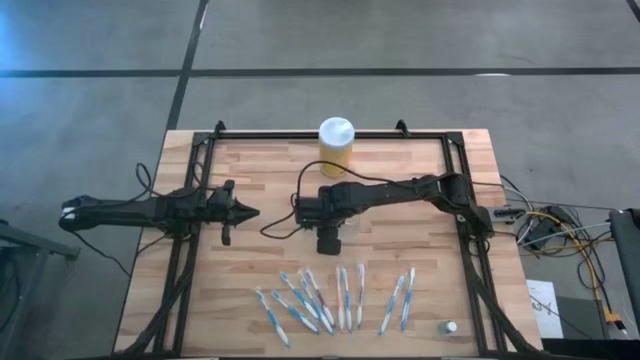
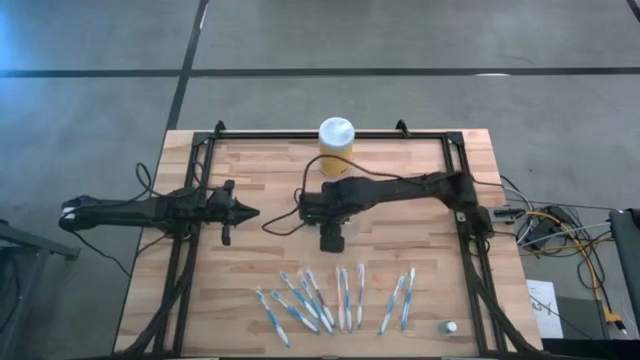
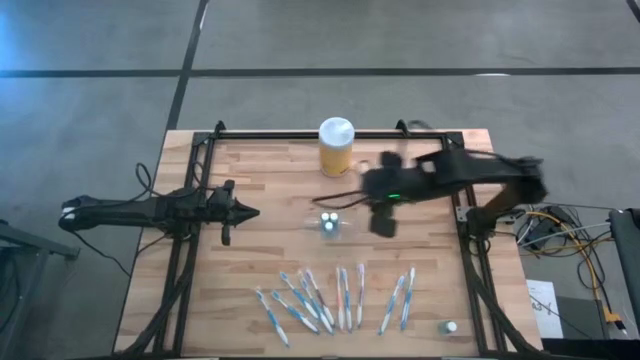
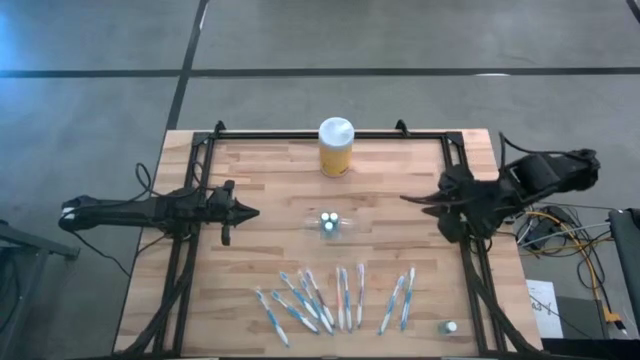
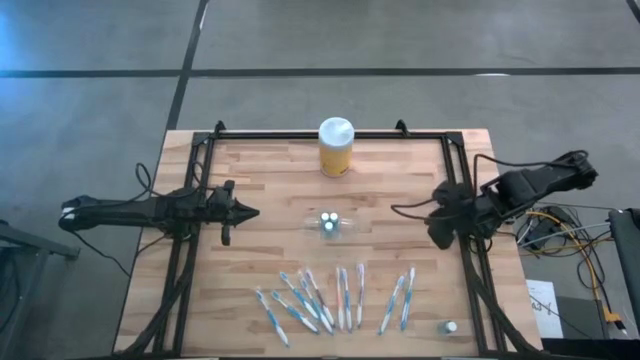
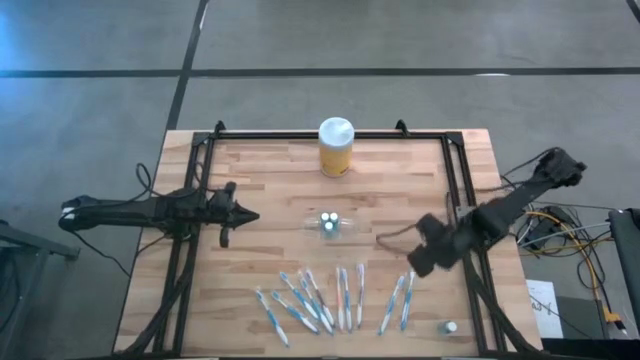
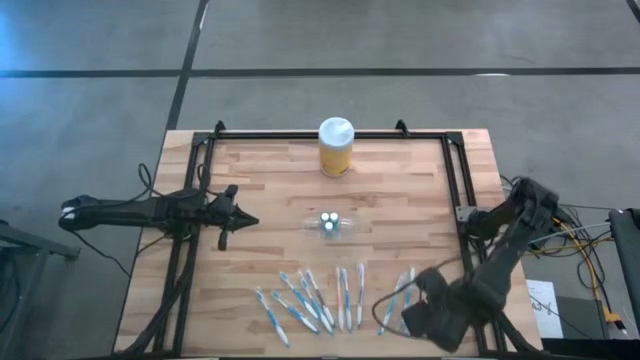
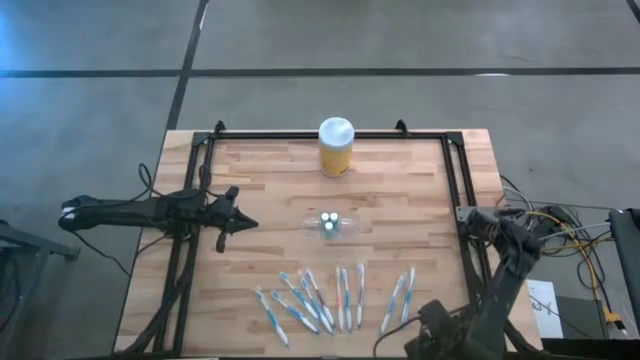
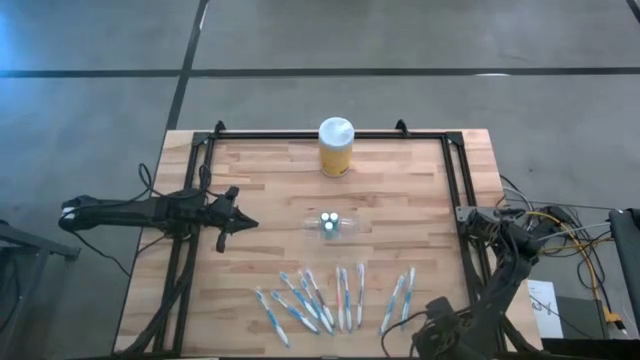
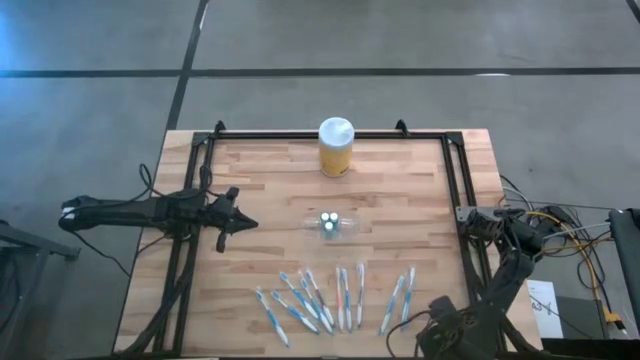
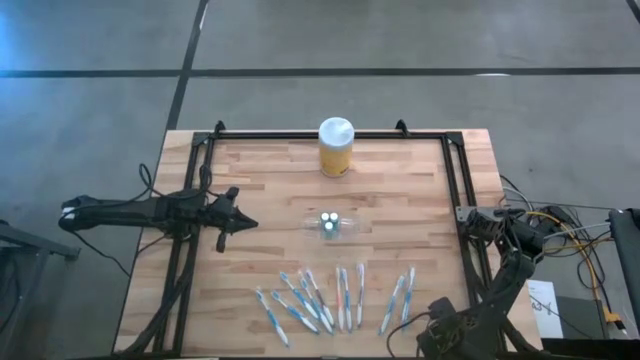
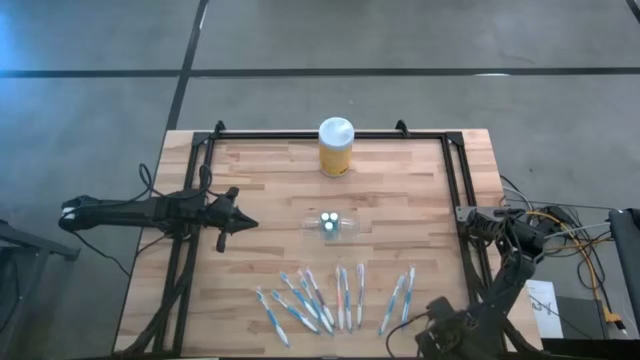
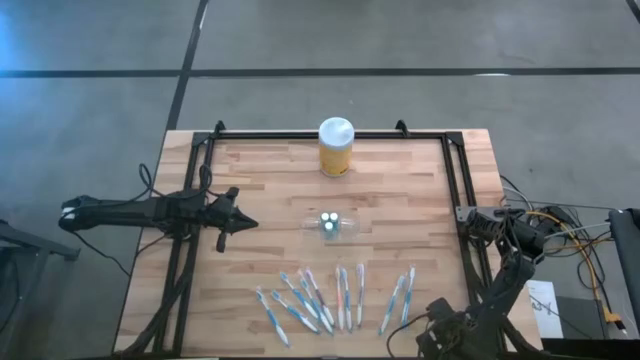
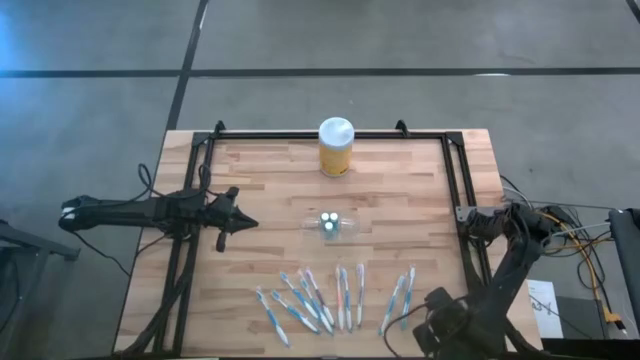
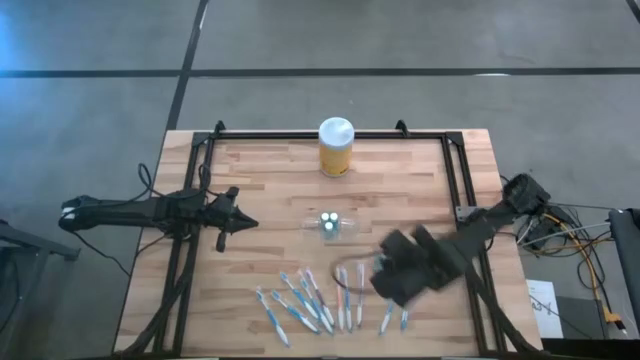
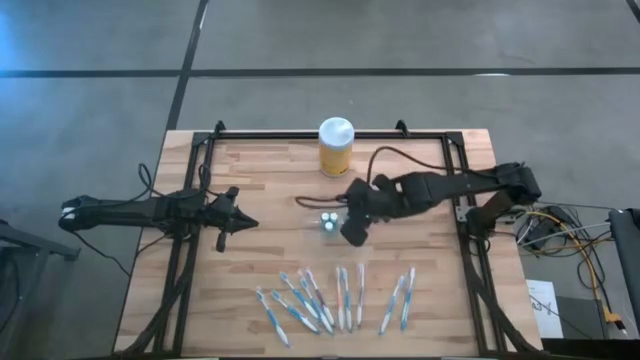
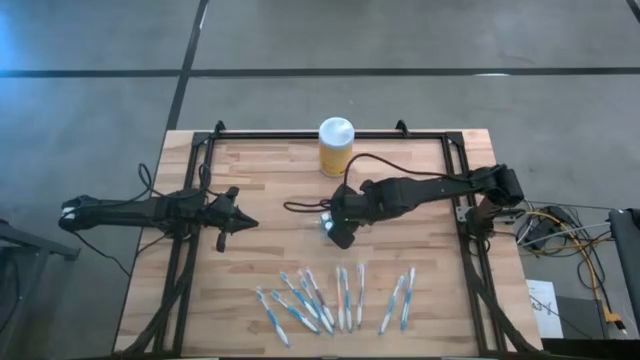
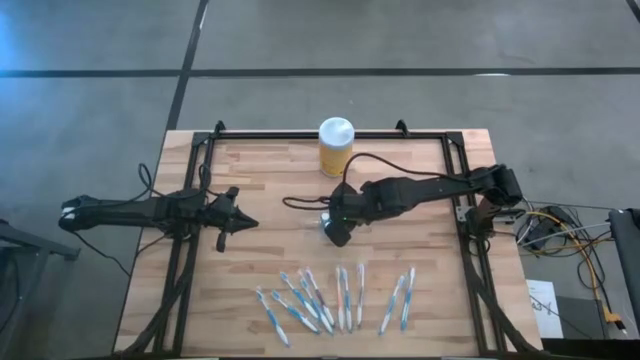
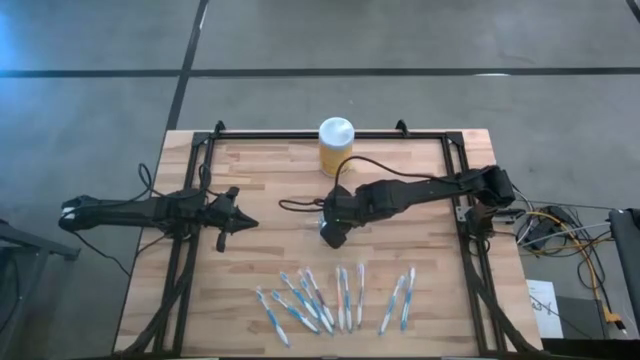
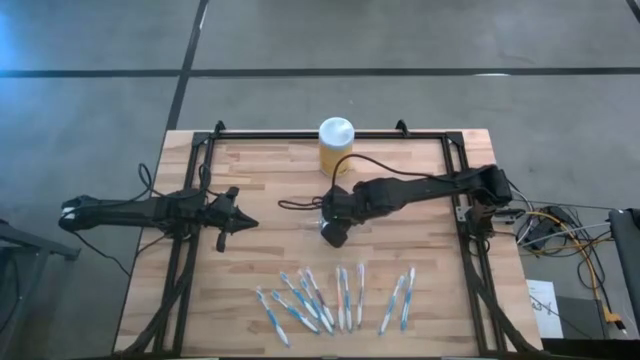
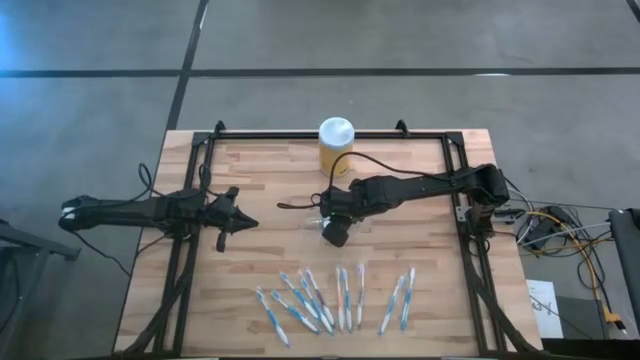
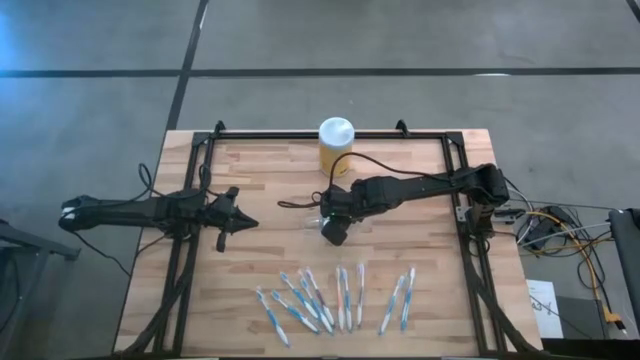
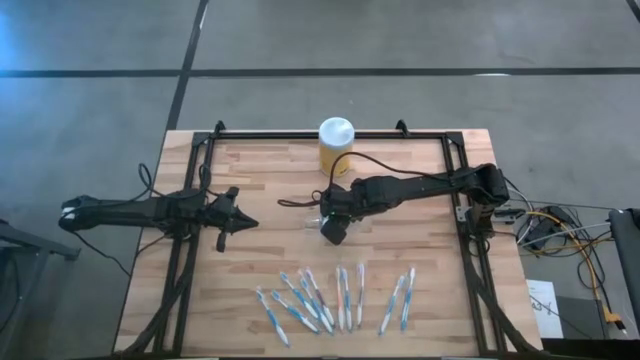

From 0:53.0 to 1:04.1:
Task: Pick & Place toothbrushing station
Put the blue mouthwash into the transparent organizer

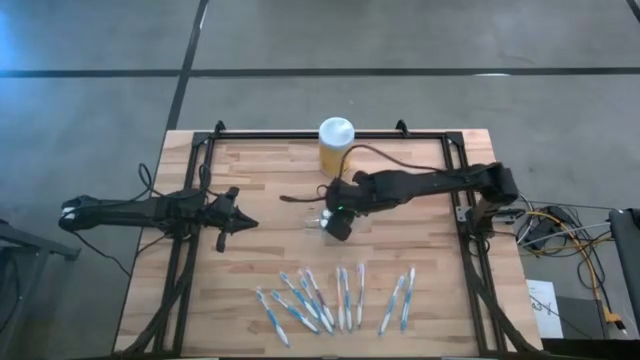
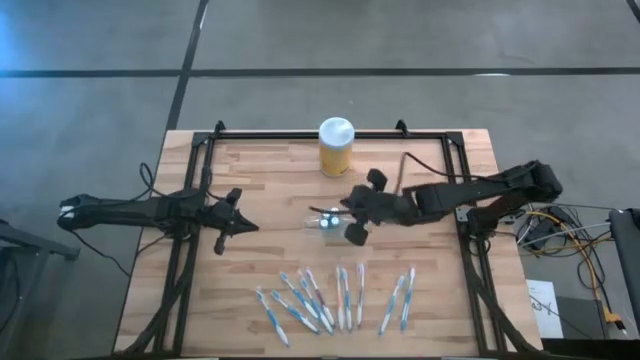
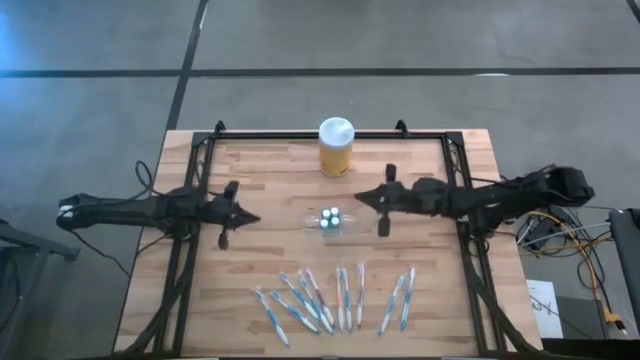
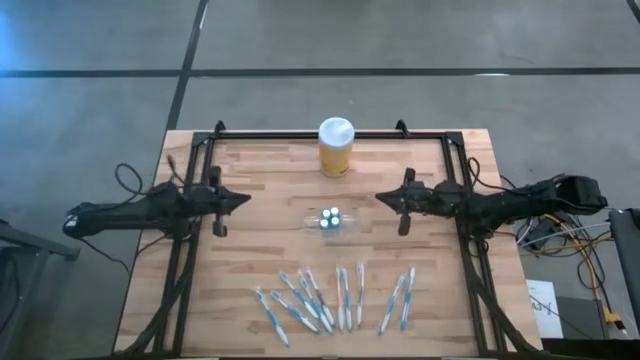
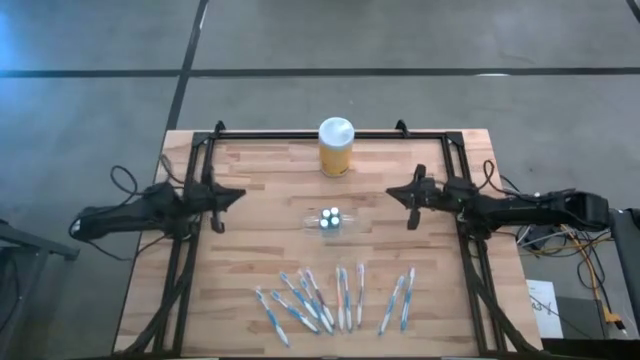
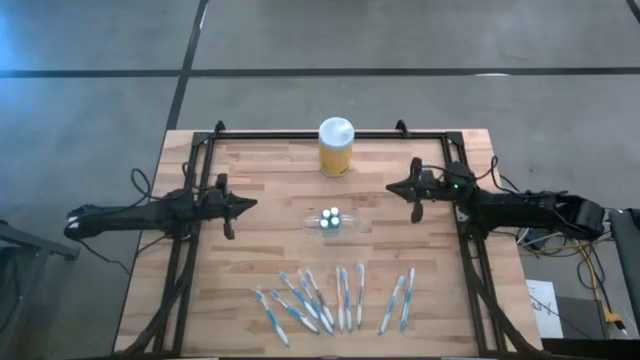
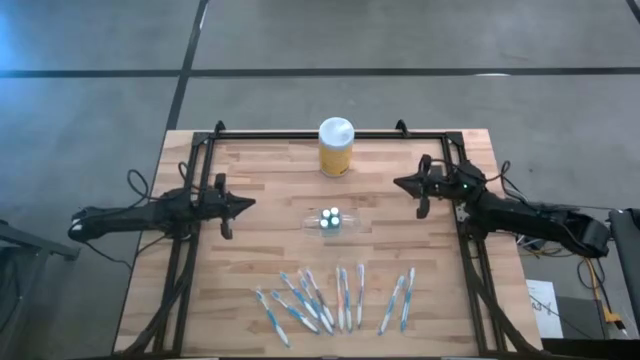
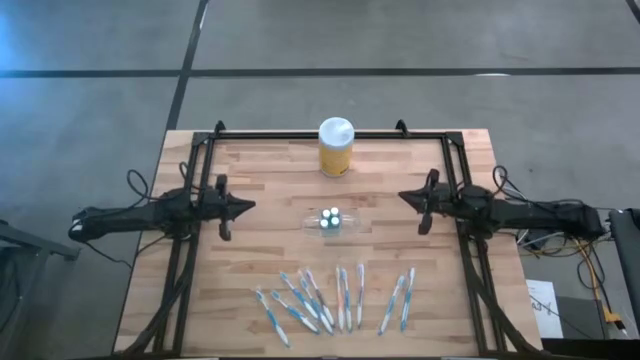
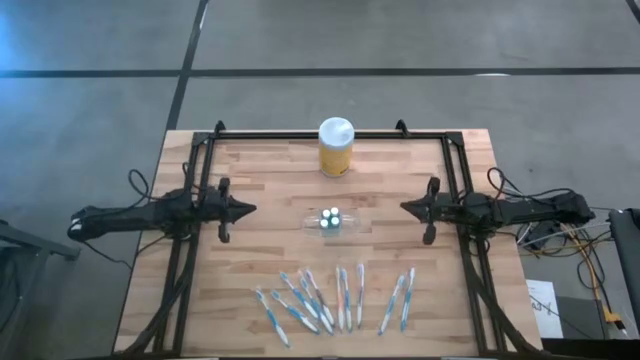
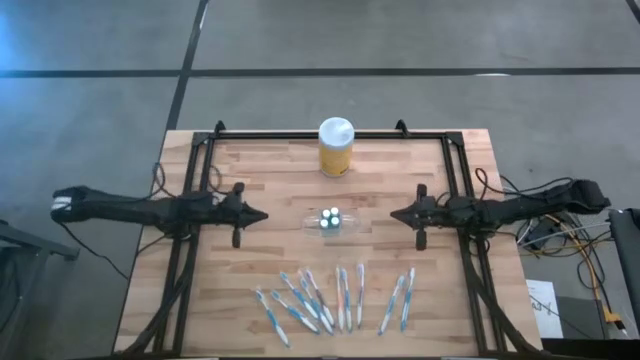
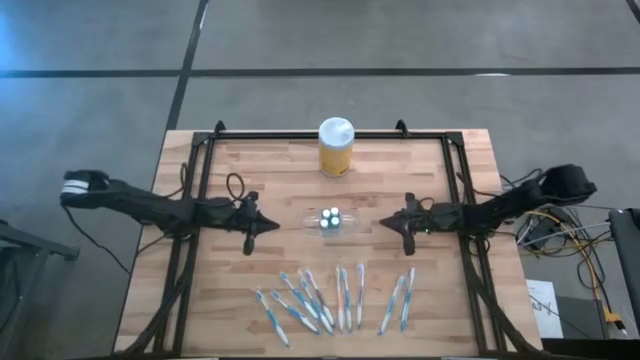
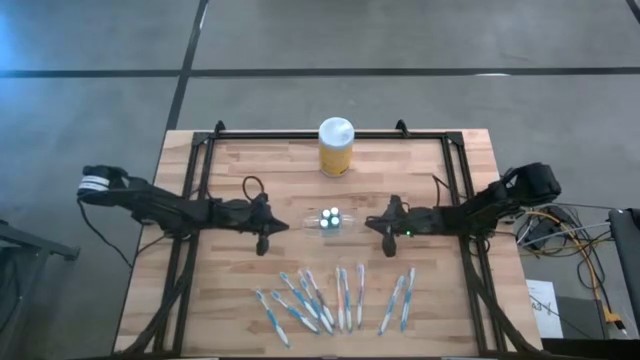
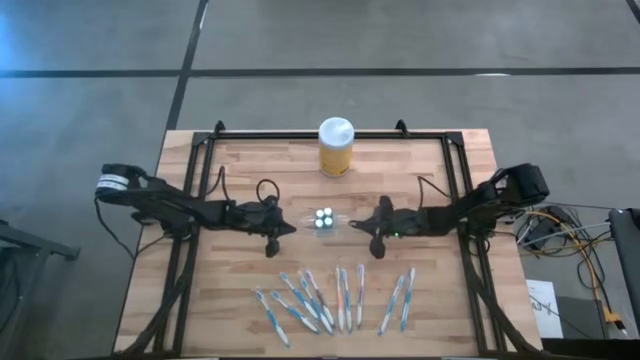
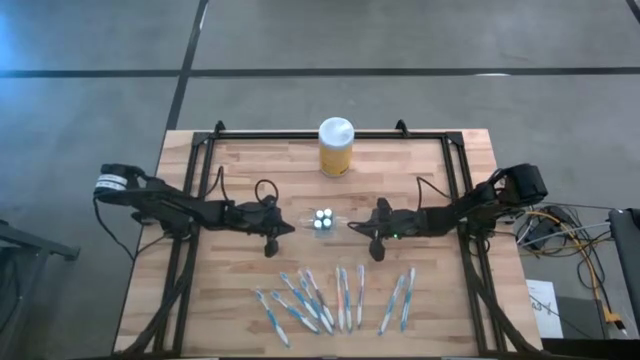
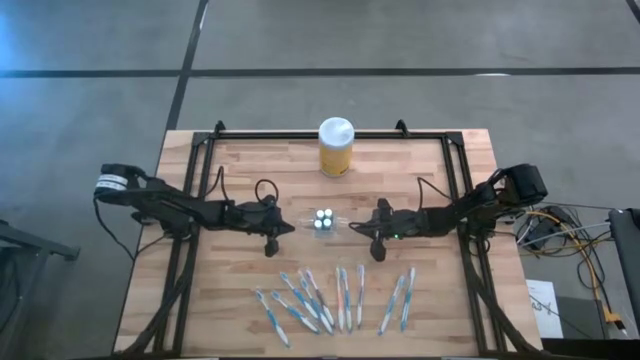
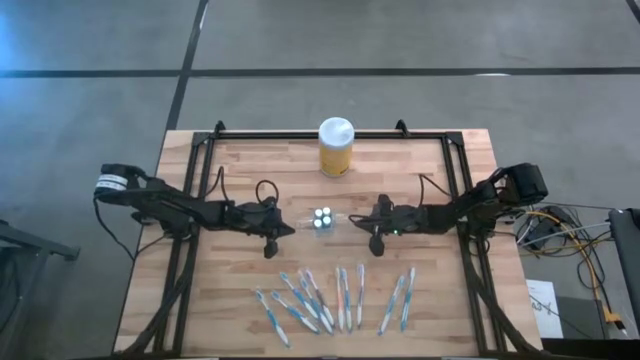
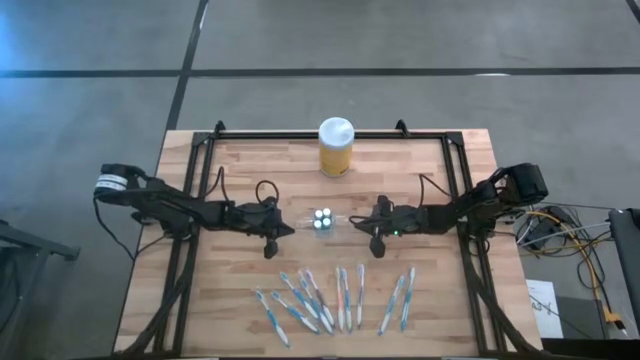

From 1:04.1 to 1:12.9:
Adjust the transparent organizer

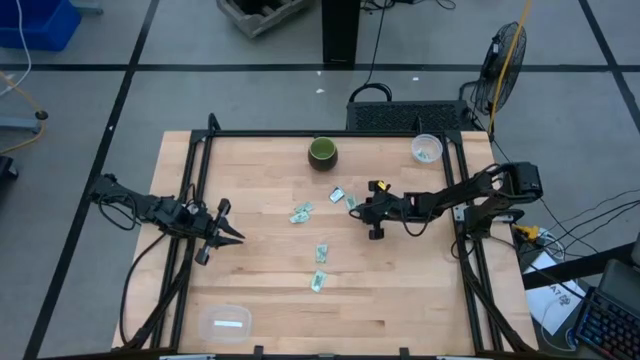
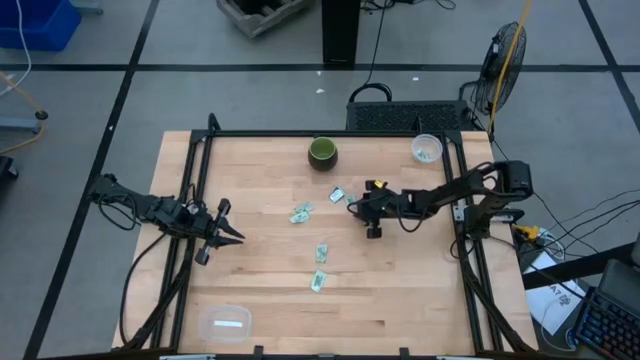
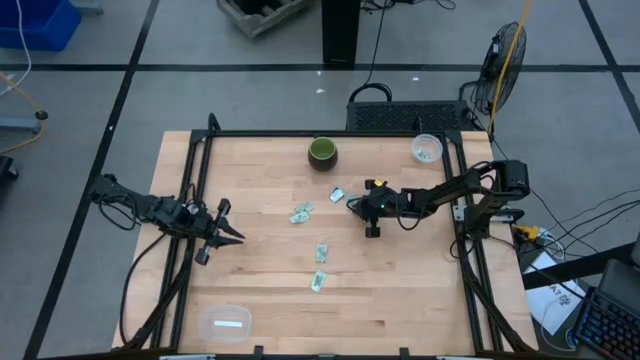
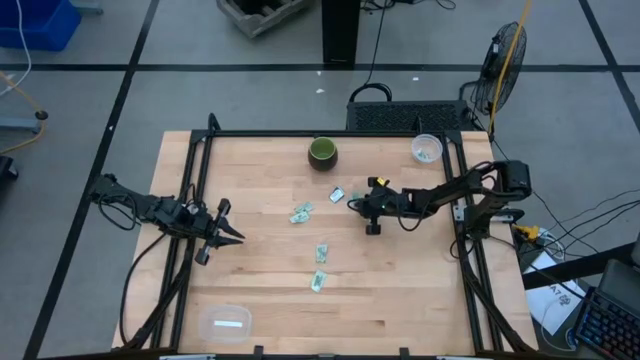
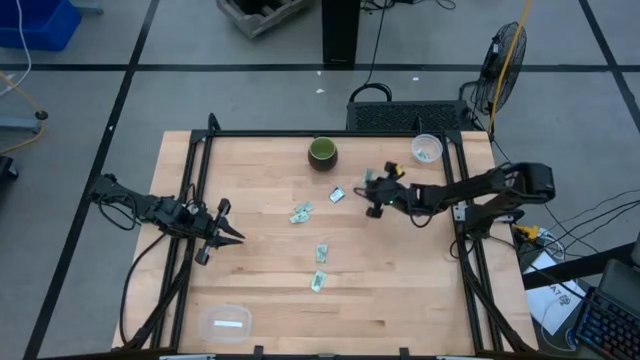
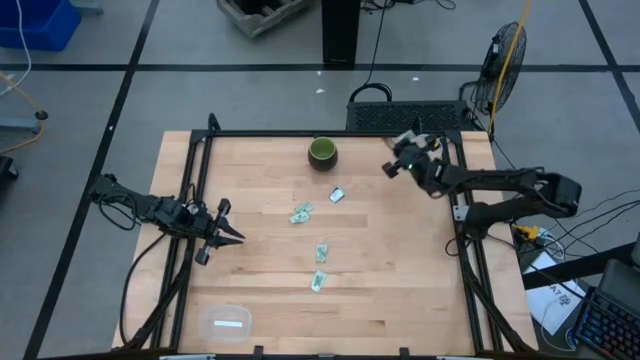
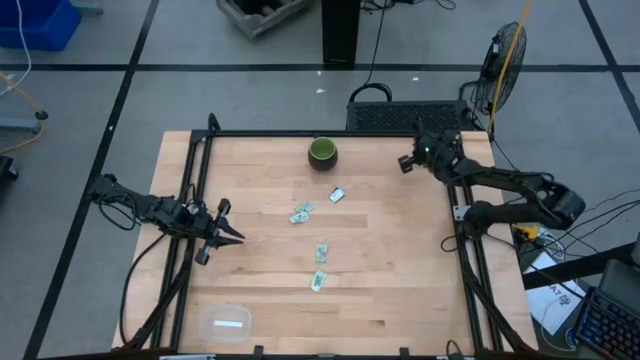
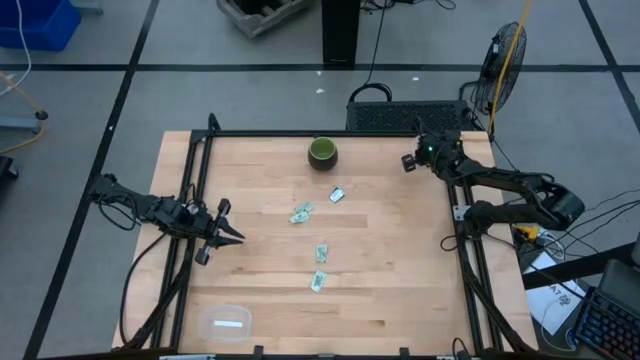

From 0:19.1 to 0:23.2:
Task: Pick and place items into bin
Put the stevia packet into the top transparent bin
